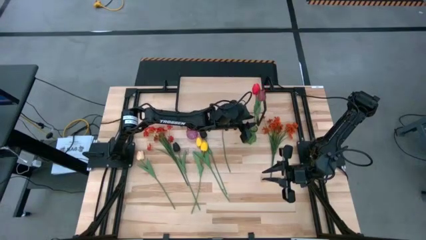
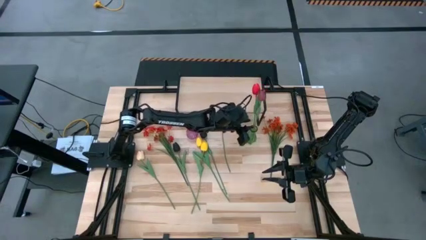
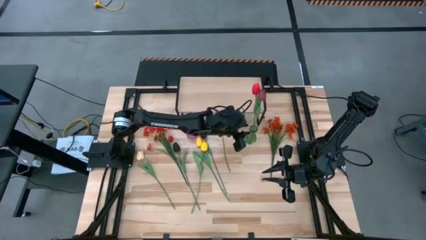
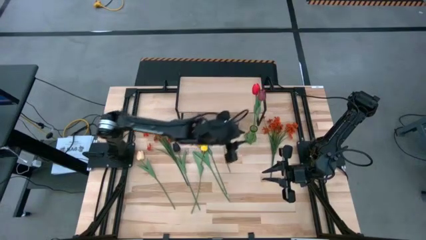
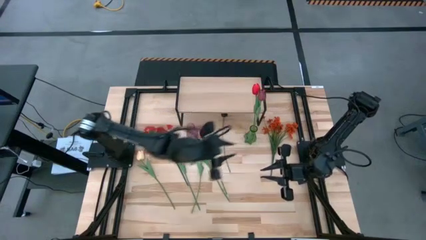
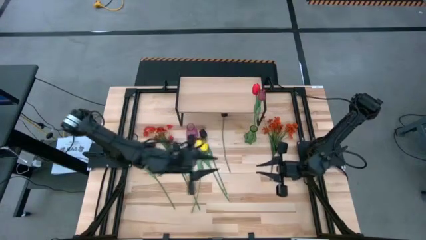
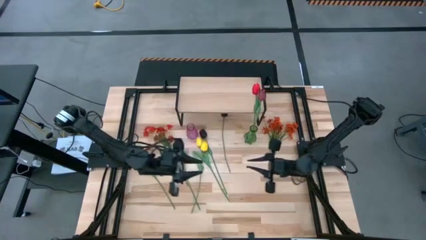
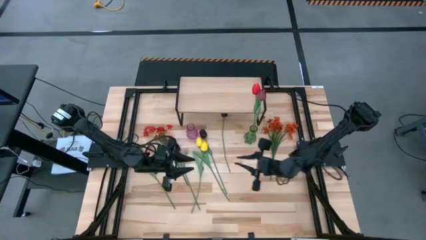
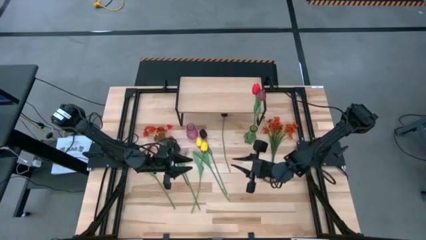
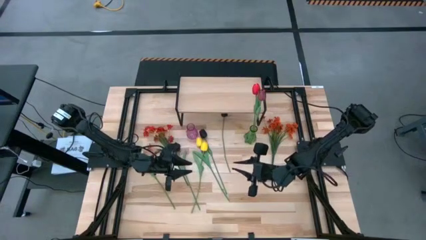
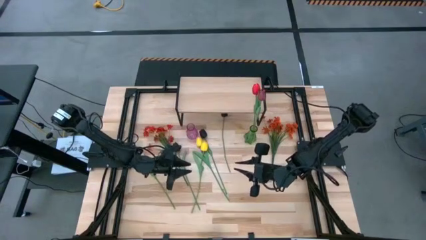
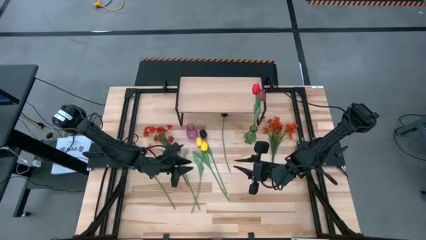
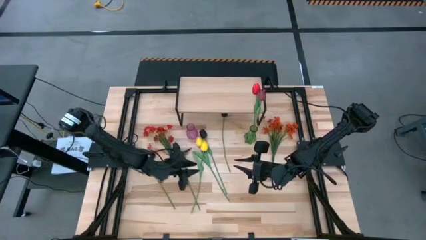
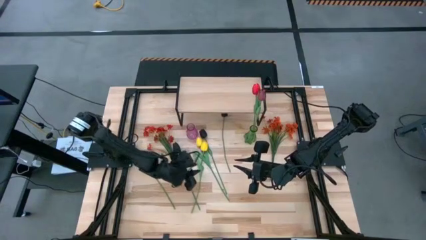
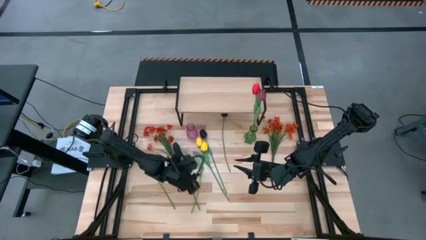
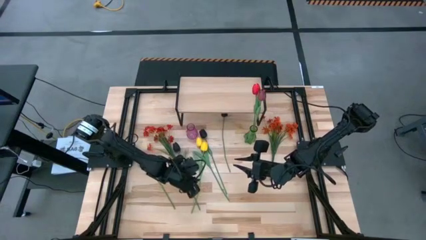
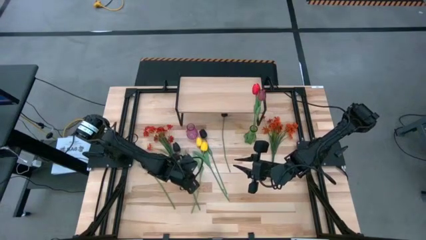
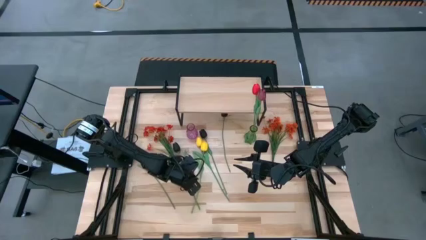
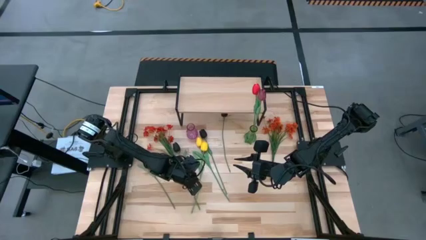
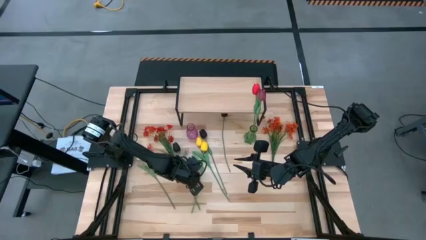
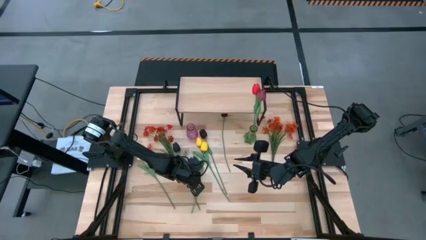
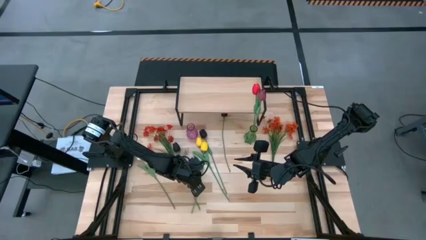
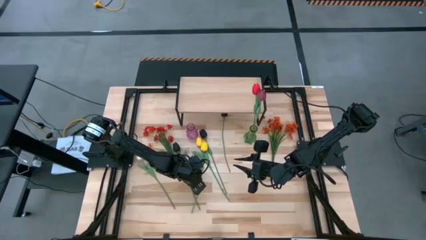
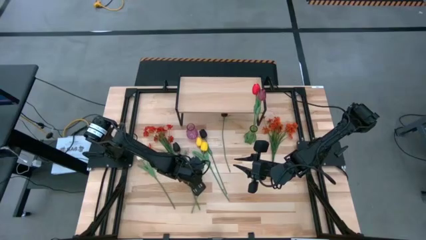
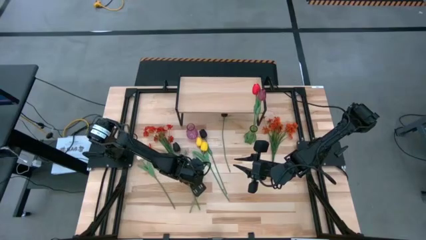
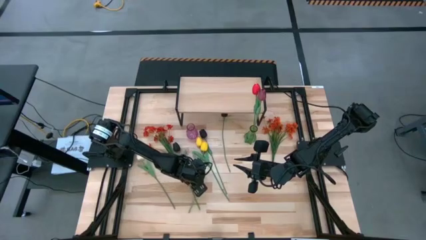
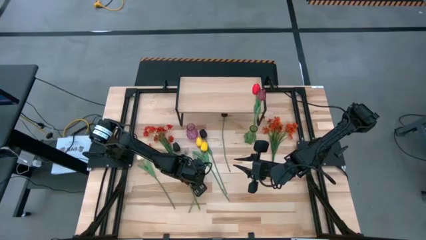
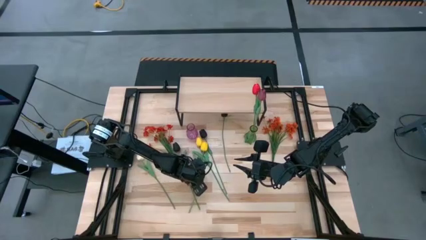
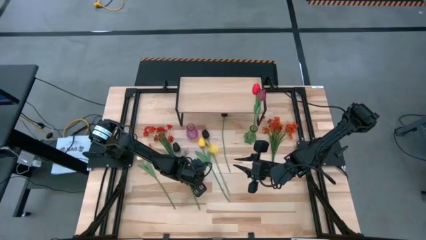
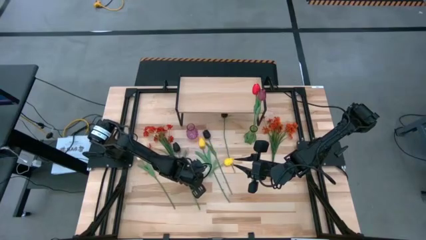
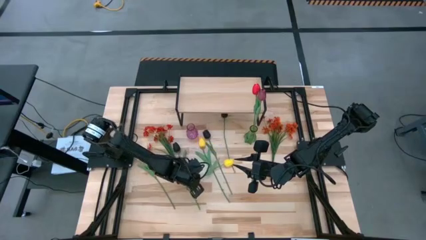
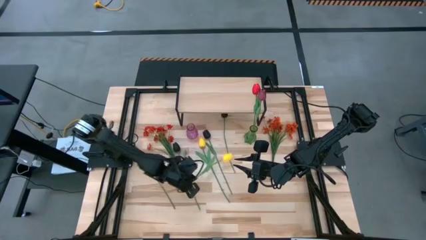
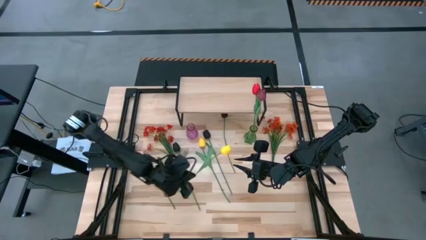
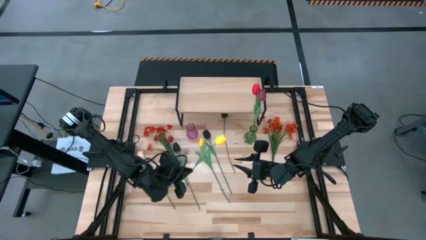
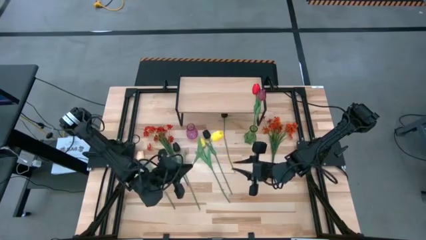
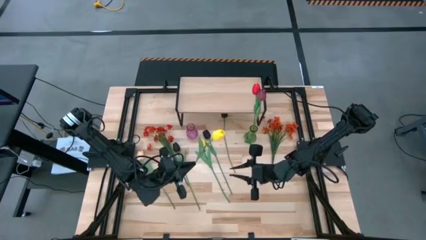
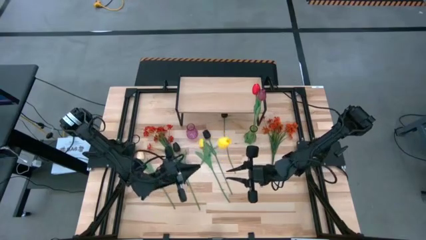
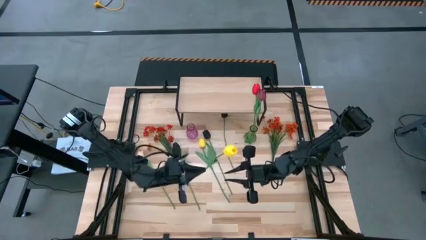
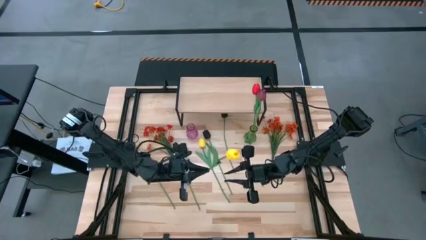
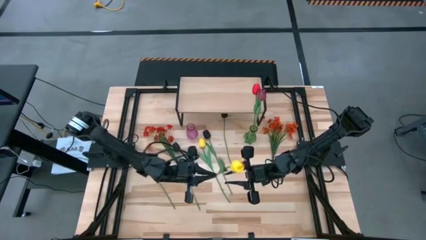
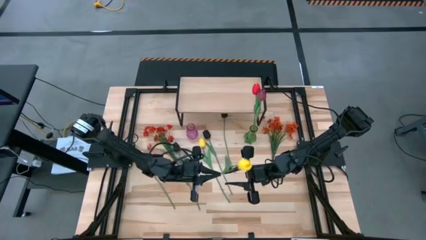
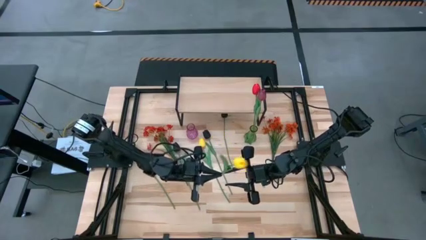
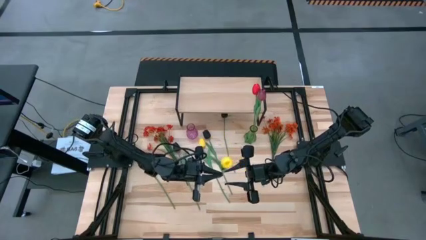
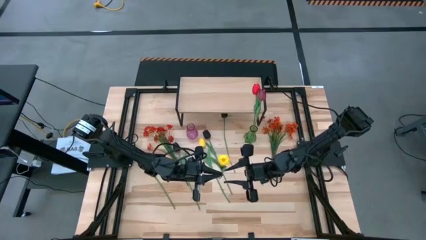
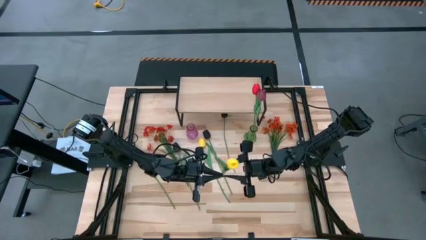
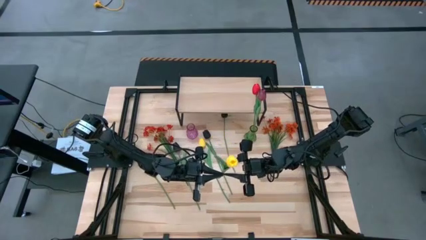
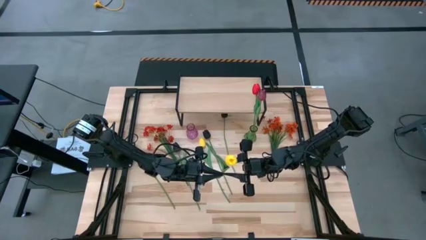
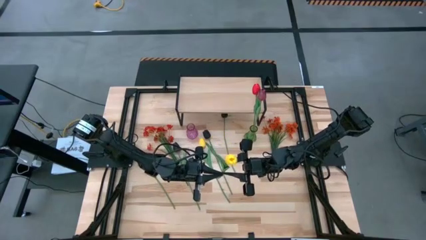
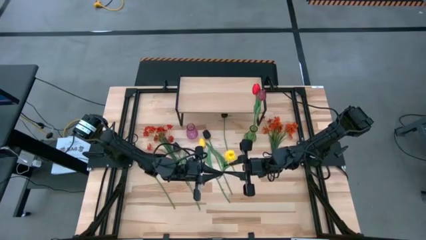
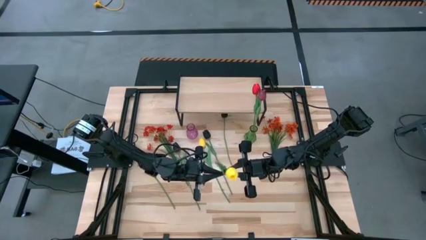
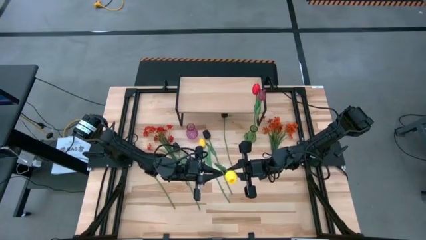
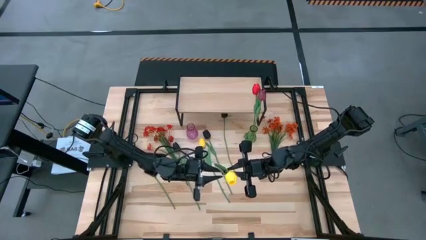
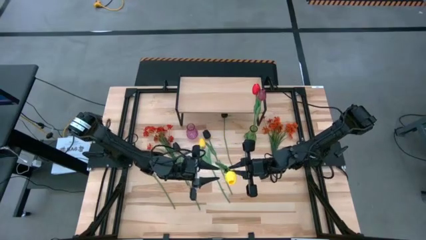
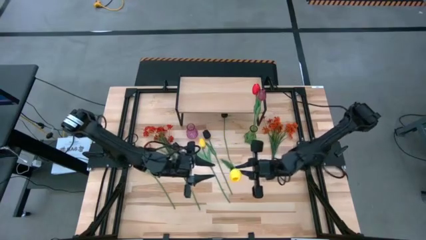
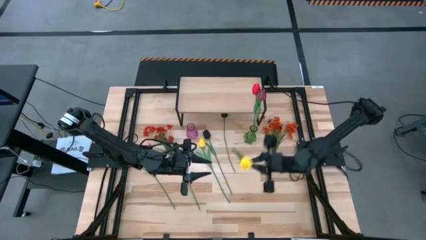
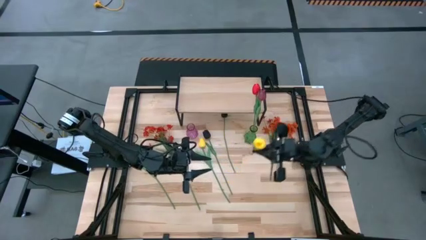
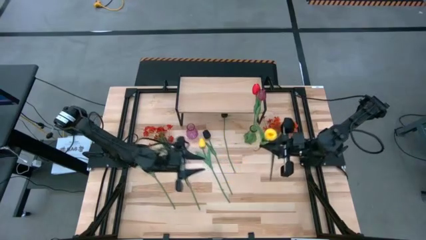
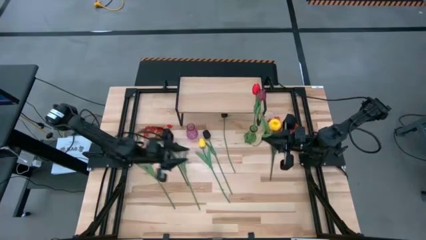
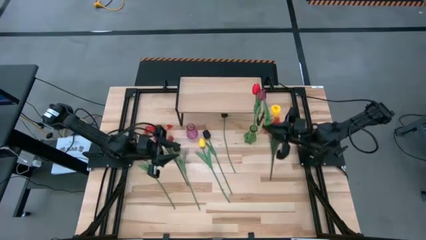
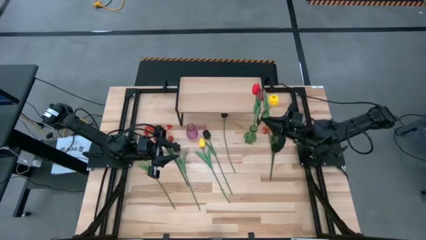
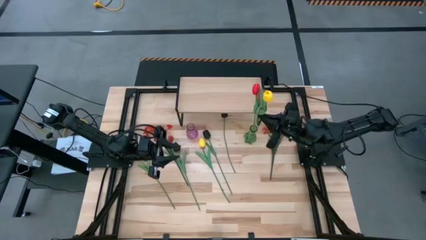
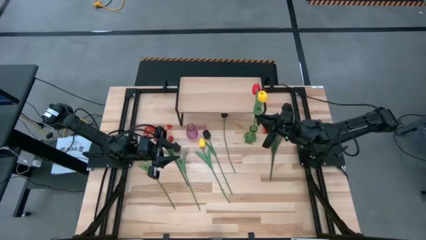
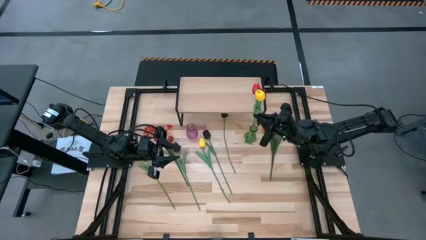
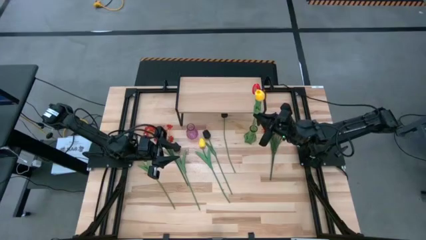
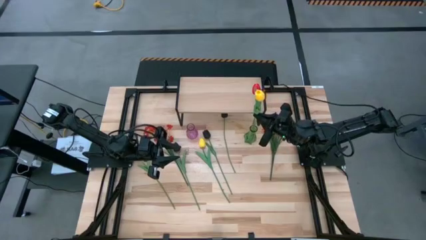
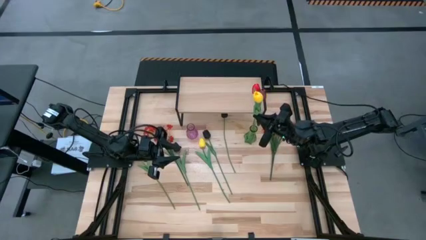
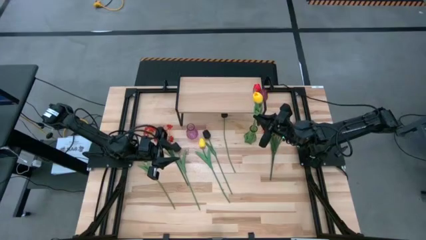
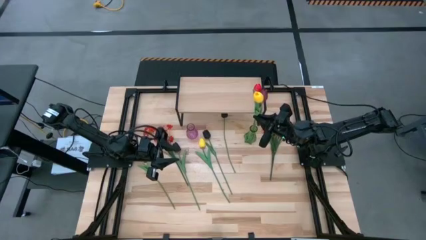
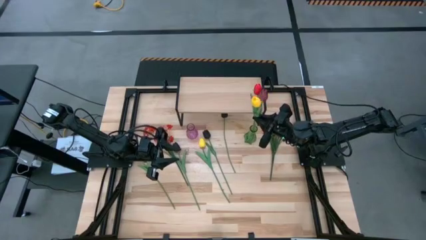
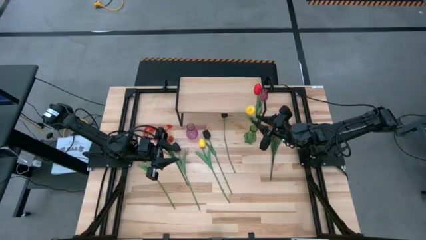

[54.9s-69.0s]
Task: Pick and place flowers into a vace then onto a shelf
Put the yellow tulip into the green vase
